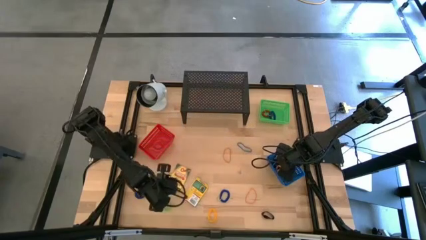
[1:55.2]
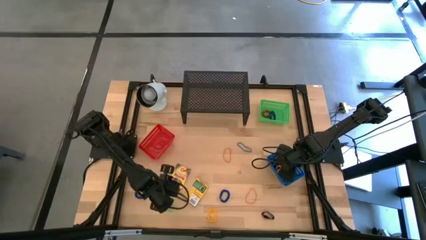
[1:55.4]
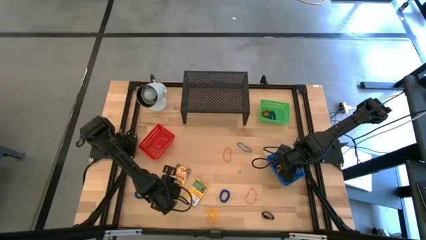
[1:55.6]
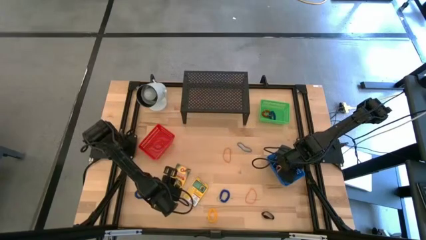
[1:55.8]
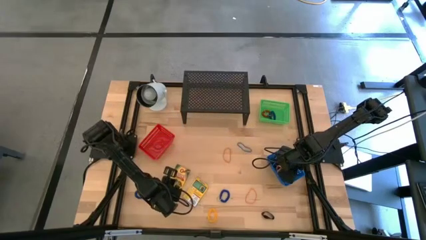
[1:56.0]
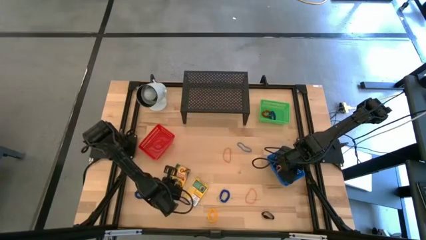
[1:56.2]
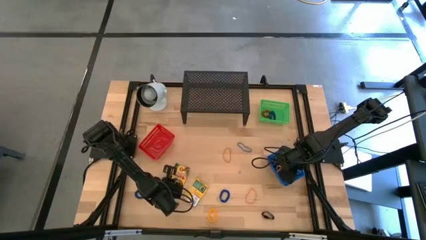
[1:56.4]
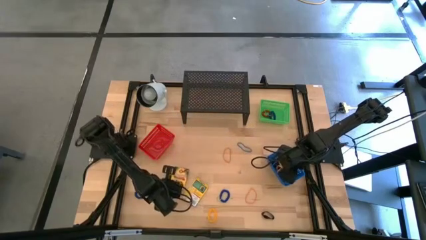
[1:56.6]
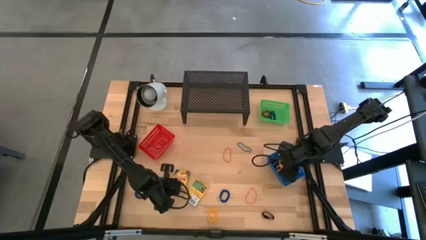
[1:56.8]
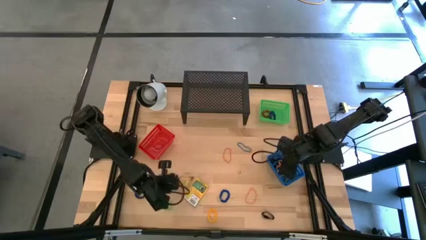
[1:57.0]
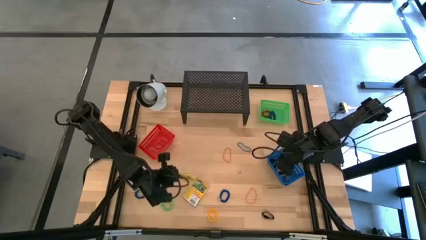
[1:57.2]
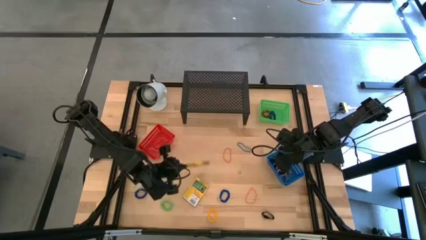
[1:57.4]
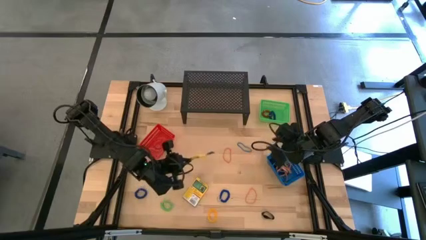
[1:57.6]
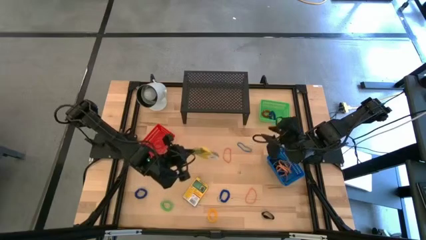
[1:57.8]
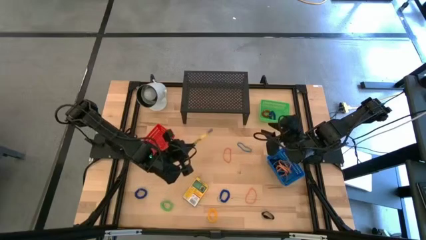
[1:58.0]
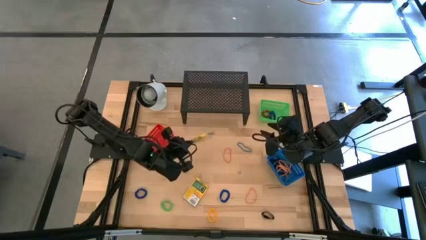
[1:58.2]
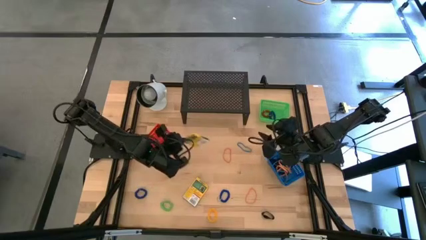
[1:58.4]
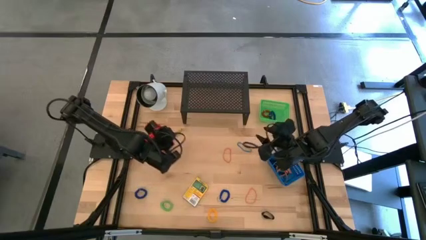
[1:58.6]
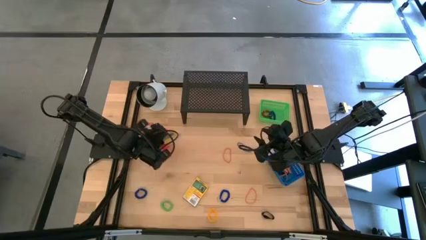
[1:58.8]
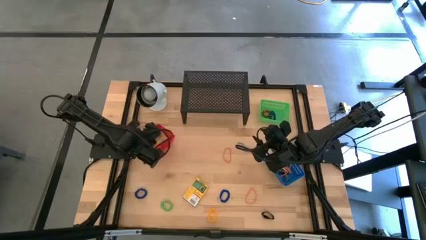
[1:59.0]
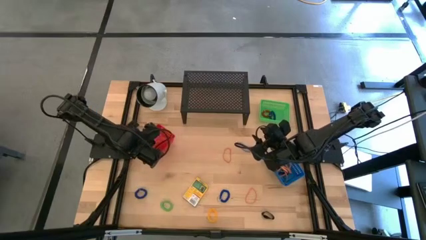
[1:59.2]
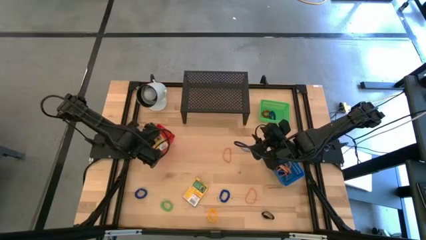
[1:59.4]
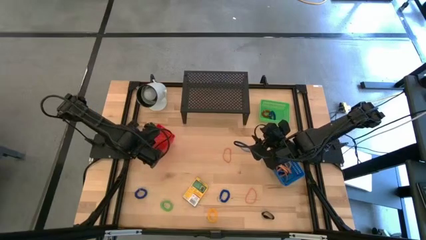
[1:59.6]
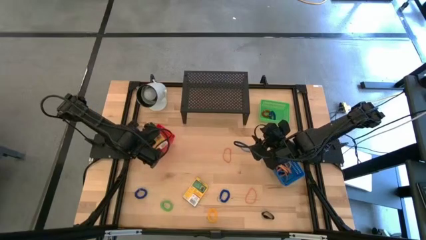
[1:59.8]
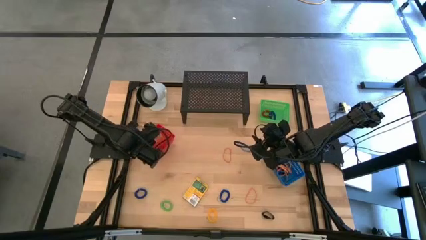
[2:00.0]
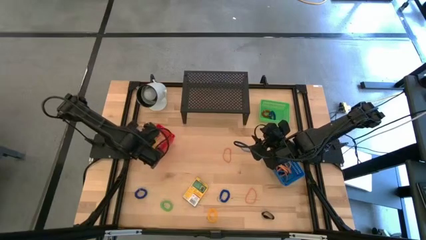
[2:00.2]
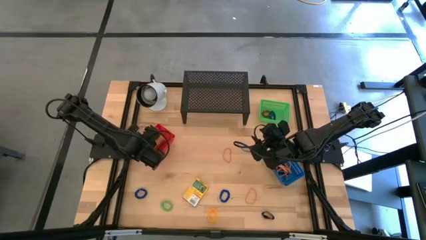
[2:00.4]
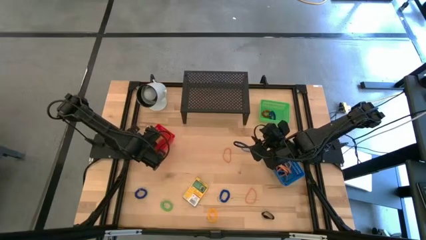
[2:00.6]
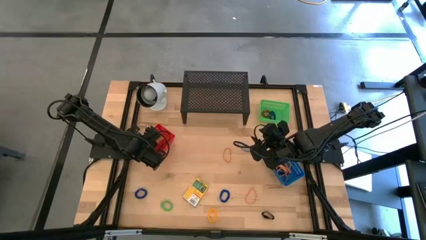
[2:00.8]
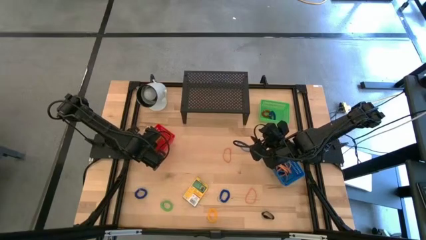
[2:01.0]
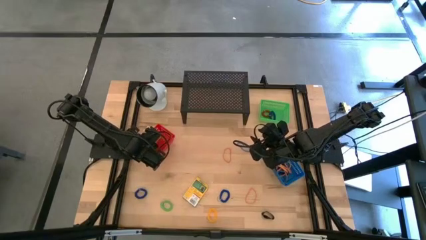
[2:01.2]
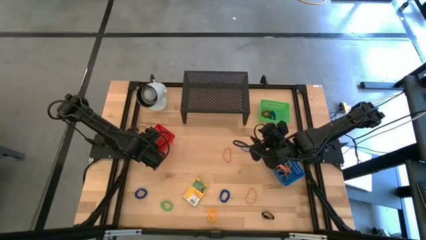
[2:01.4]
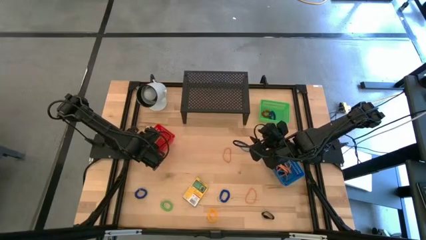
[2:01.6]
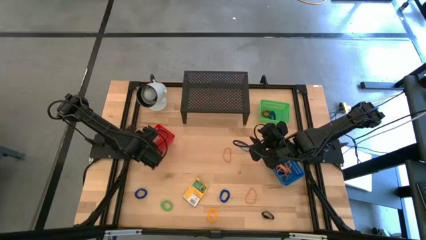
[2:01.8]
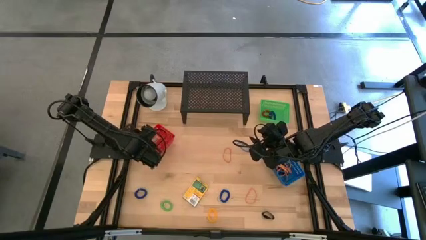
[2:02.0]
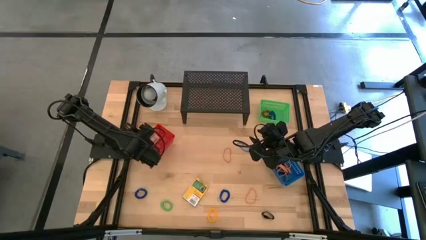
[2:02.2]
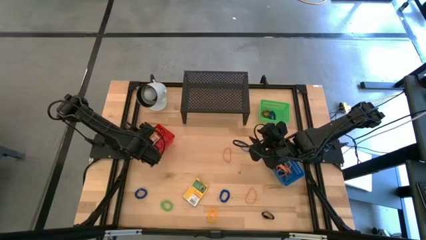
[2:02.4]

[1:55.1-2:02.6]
Task: Pick & Place Office Desk Supplies
Put the yellow crayon box into the red bin

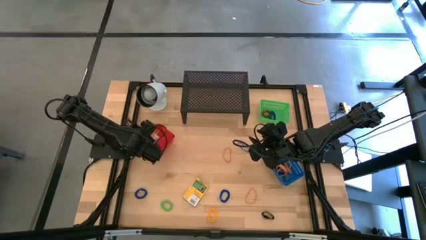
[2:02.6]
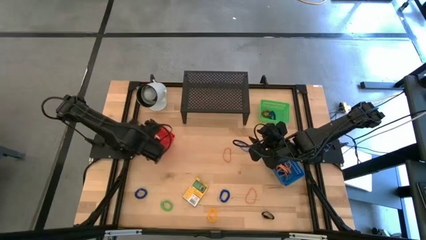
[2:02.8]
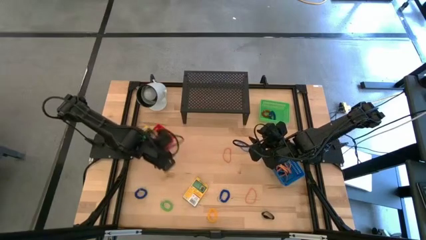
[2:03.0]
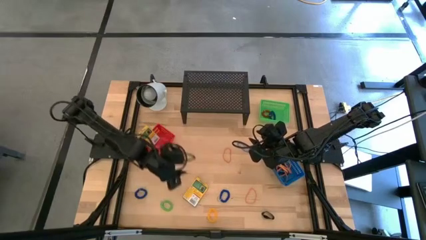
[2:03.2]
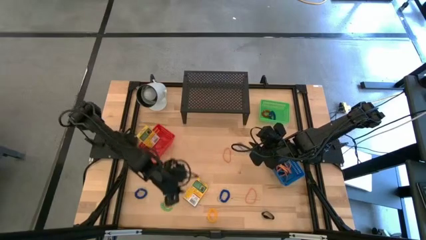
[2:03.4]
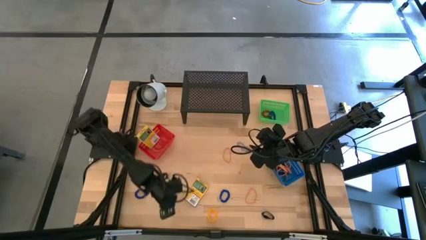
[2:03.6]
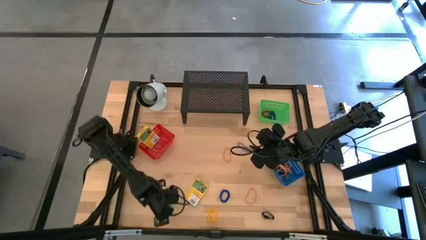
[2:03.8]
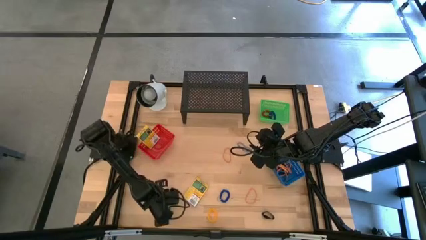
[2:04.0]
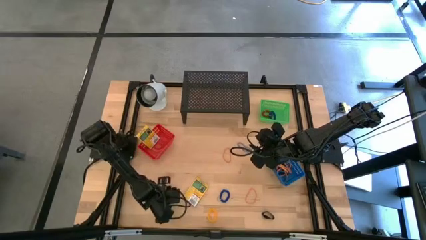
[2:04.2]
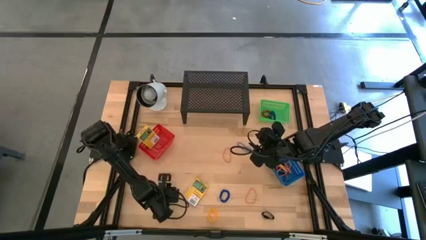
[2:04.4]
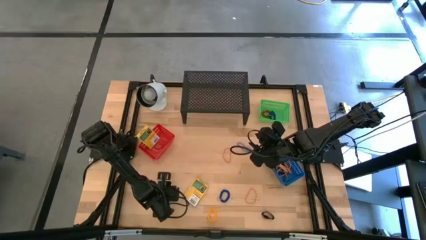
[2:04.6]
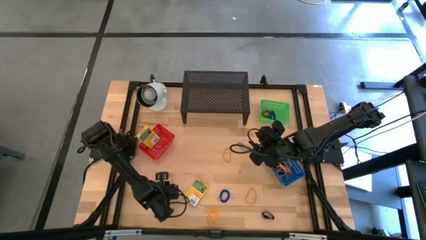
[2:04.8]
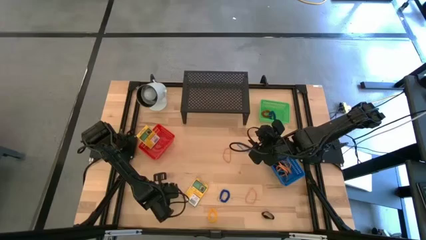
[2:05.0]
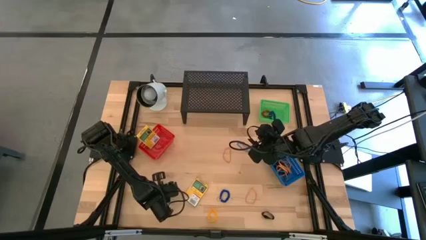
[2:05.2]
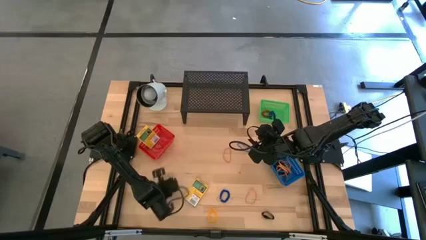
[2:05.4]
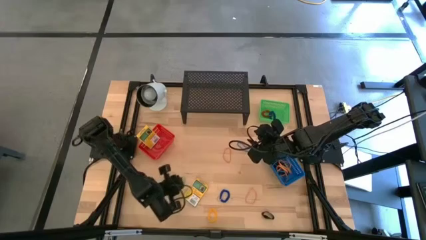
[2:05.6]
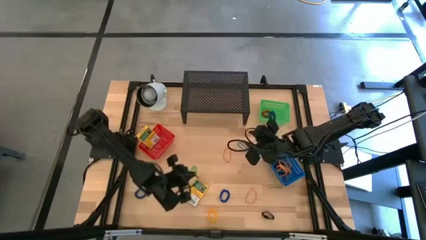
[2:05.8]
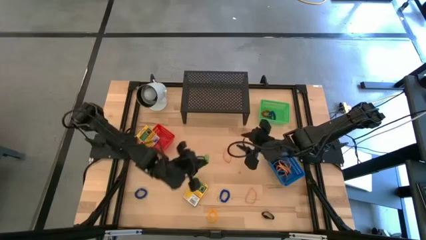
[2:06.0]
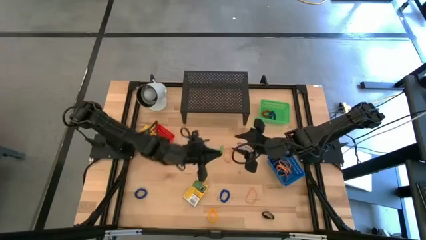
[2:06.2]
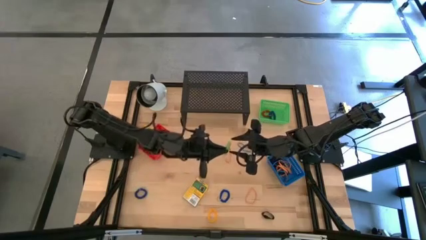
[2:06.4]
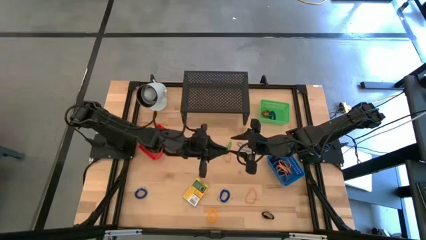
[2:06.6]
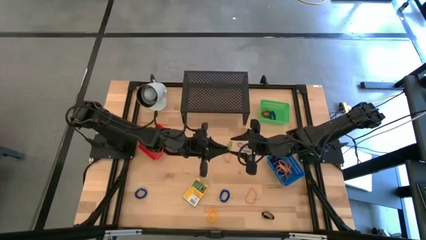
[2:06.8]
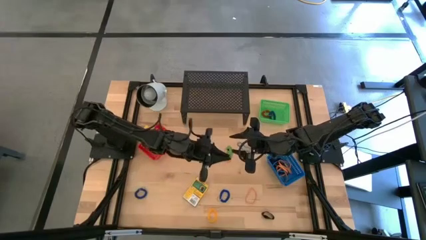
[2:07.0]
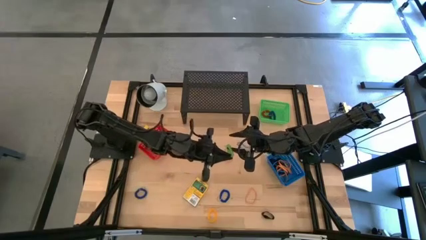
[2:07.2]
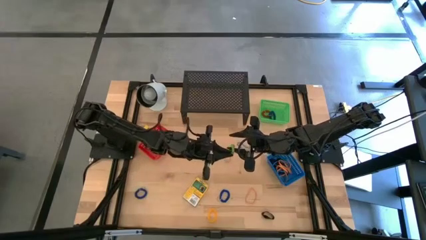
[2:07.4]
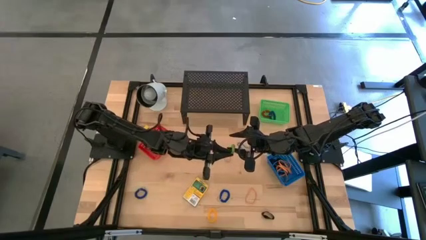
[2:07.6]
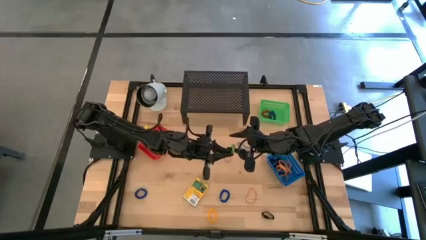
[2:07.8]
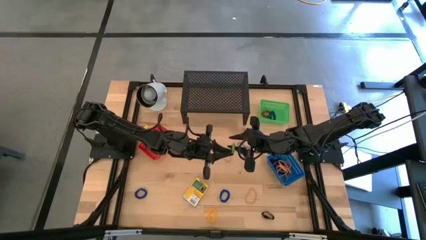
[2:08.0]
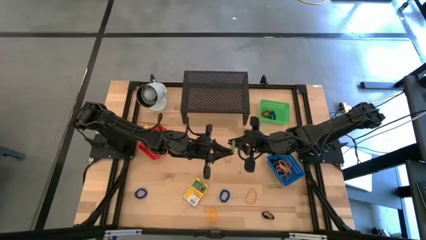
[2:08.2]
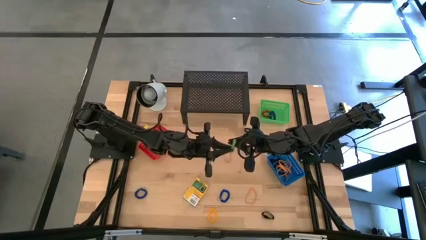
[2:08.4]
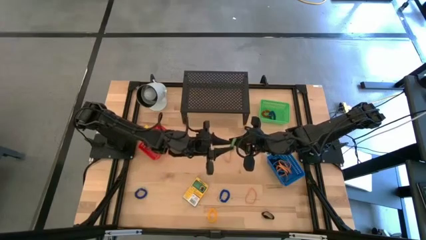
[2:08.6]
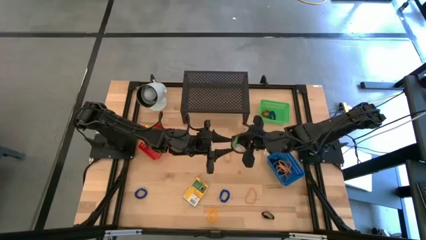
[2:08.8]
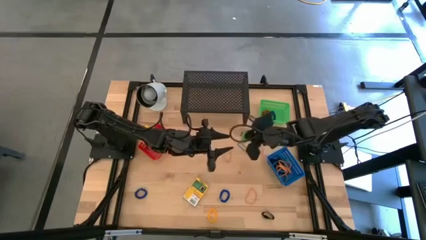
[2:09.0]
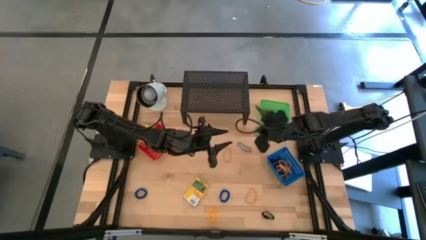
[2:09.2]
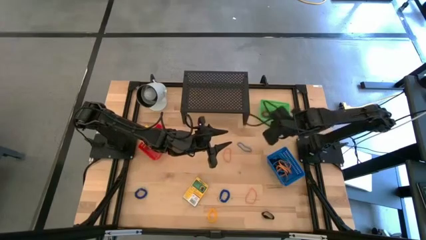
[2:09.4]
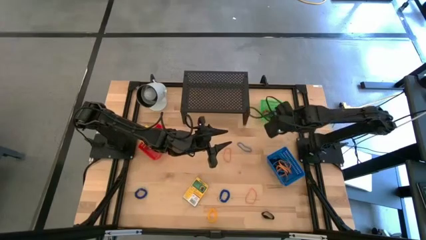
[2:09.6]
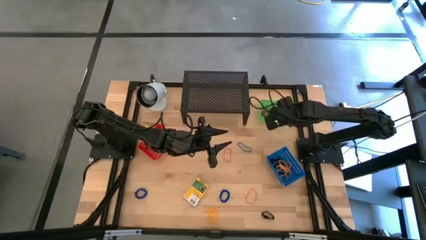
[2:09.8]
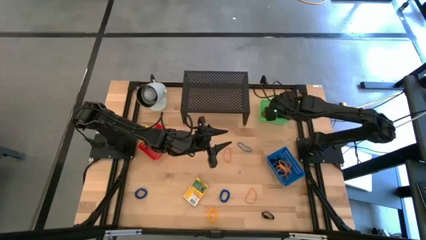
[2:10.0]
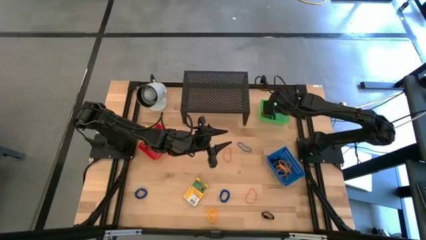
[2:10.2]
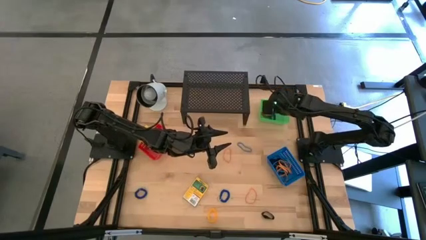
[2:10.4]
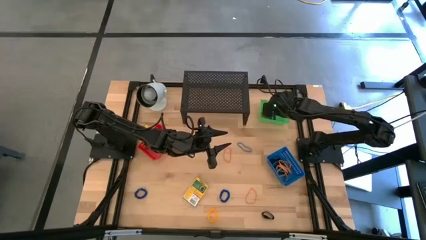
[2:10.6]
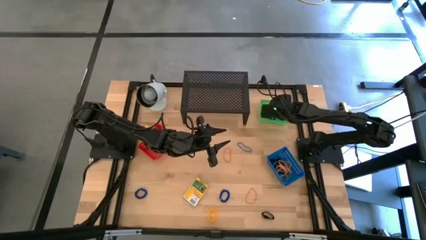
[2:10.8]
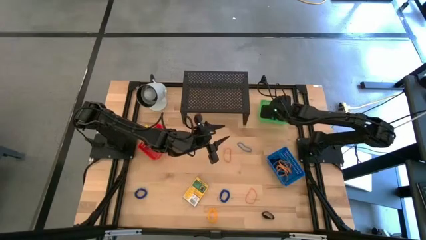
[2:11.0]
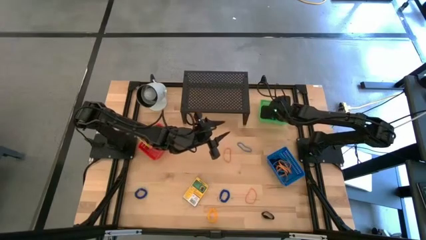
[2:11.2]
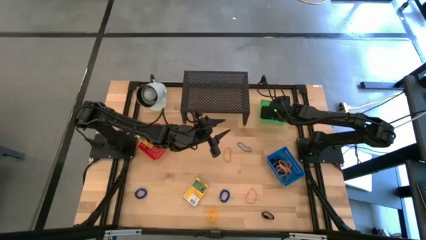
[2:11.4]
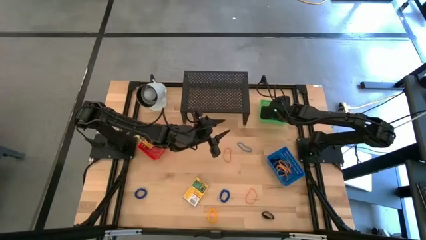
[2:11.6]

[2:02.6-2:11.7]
Put the green spring keychain into the green bin
